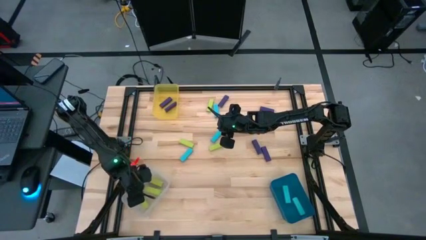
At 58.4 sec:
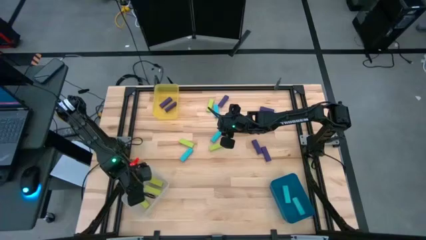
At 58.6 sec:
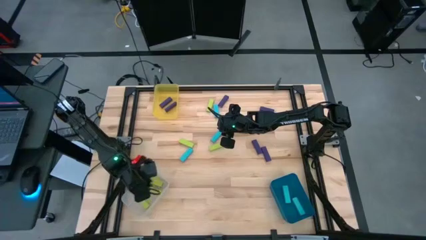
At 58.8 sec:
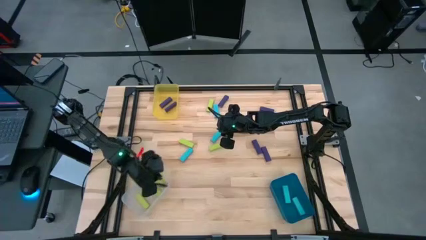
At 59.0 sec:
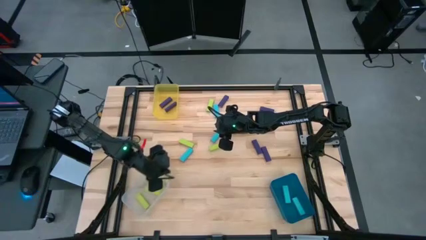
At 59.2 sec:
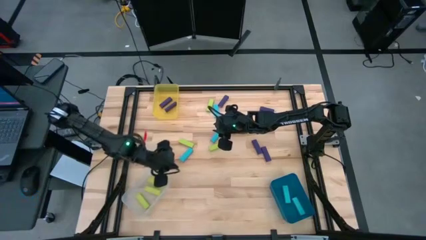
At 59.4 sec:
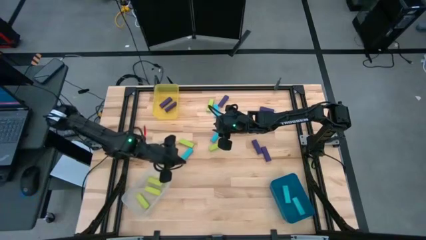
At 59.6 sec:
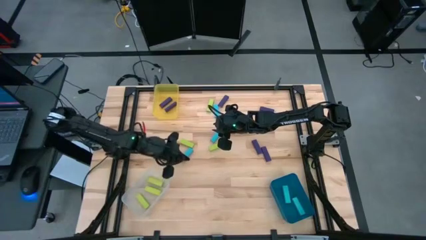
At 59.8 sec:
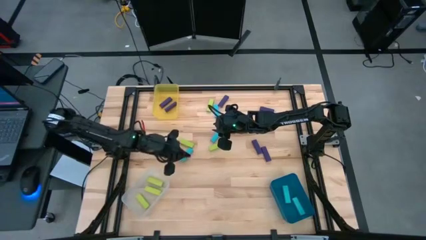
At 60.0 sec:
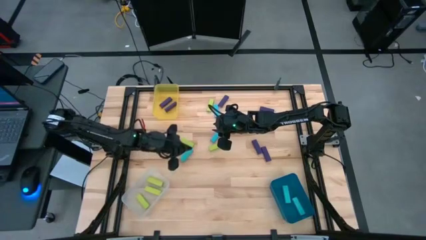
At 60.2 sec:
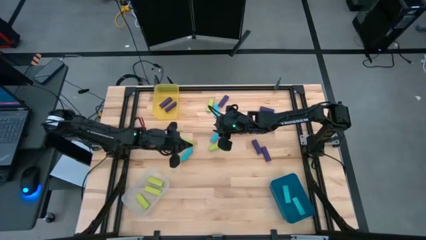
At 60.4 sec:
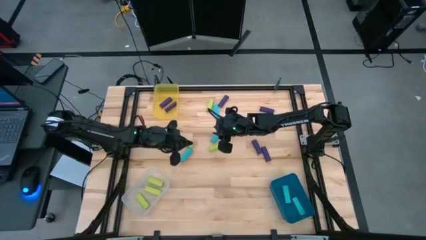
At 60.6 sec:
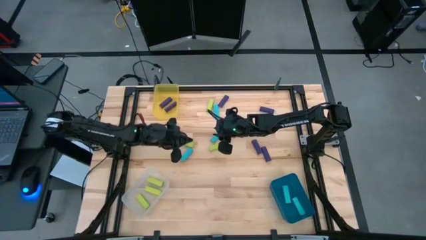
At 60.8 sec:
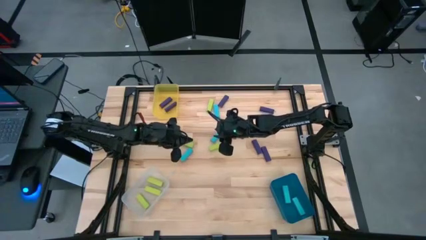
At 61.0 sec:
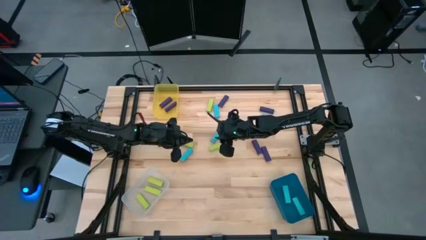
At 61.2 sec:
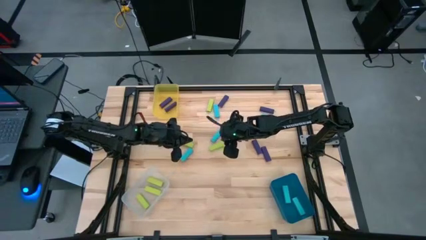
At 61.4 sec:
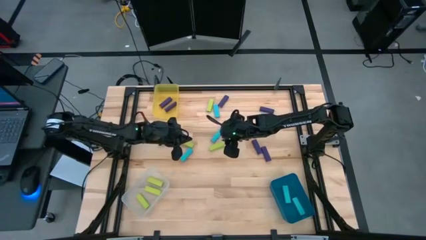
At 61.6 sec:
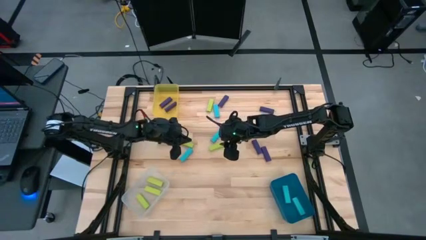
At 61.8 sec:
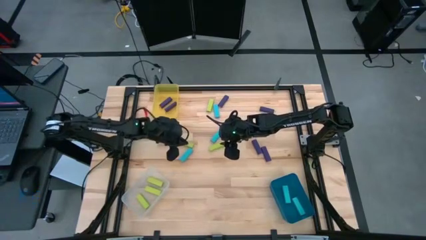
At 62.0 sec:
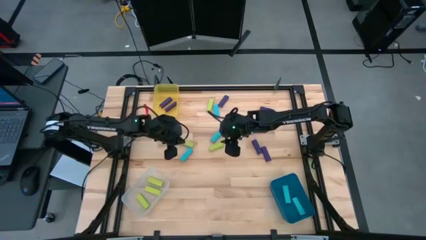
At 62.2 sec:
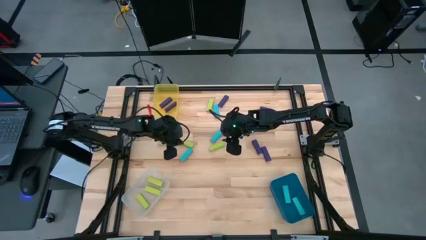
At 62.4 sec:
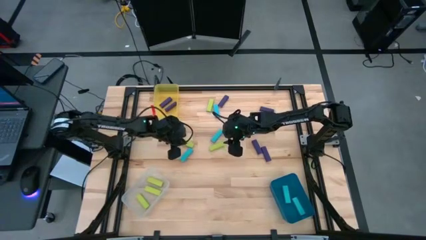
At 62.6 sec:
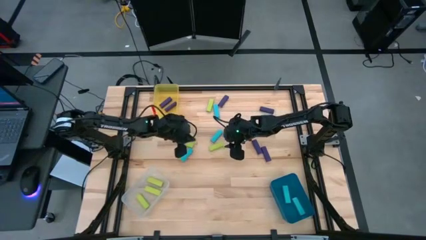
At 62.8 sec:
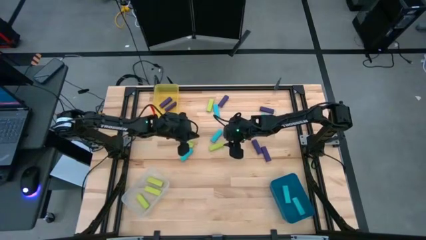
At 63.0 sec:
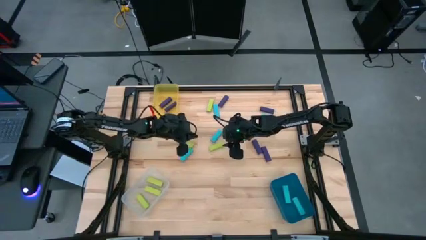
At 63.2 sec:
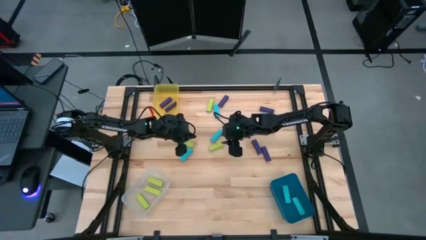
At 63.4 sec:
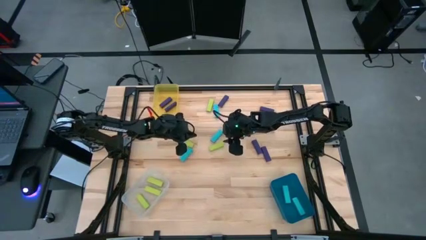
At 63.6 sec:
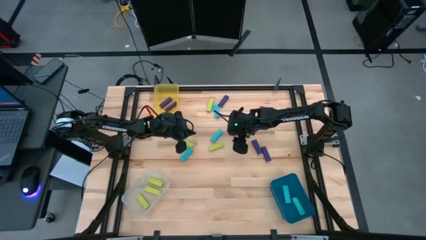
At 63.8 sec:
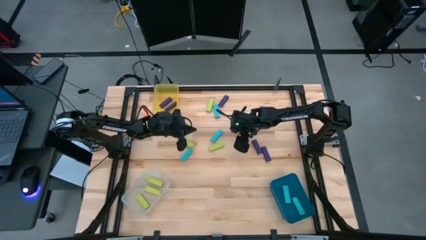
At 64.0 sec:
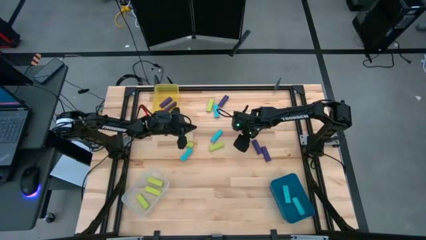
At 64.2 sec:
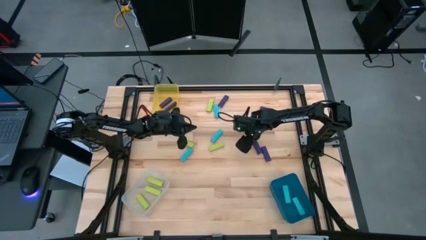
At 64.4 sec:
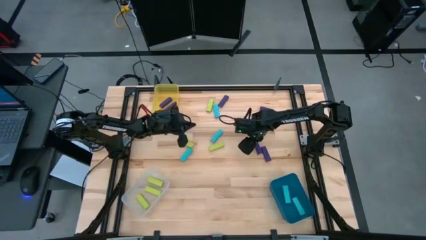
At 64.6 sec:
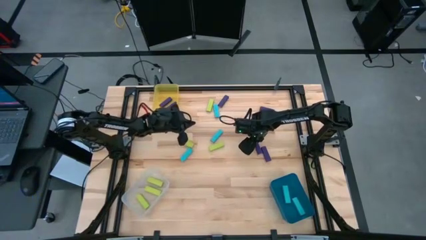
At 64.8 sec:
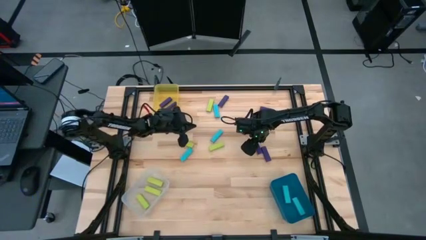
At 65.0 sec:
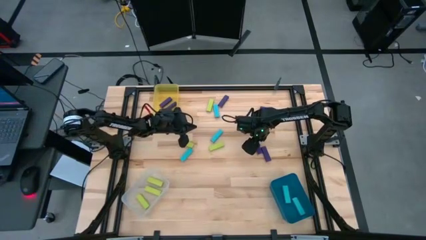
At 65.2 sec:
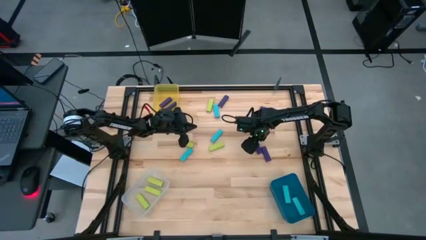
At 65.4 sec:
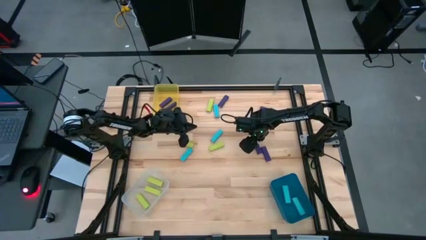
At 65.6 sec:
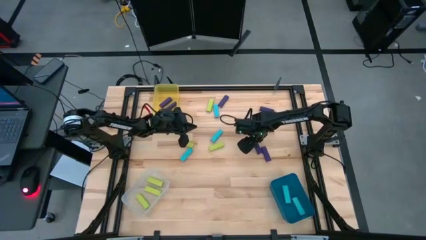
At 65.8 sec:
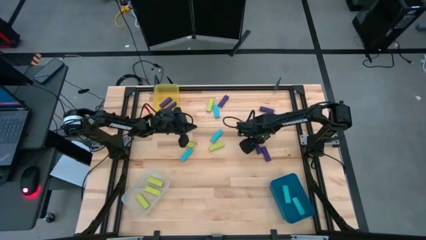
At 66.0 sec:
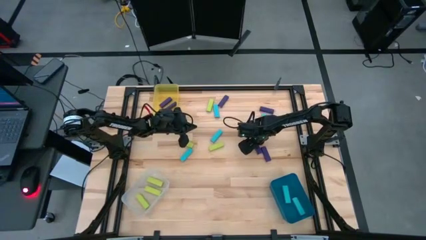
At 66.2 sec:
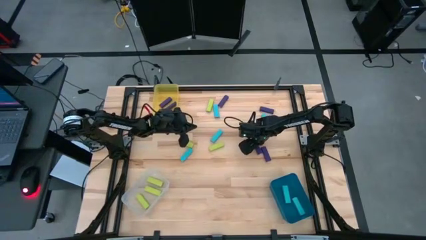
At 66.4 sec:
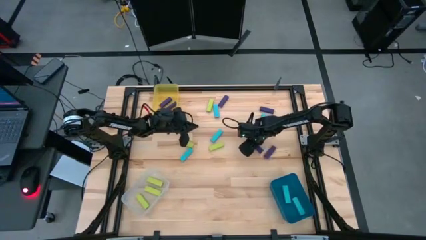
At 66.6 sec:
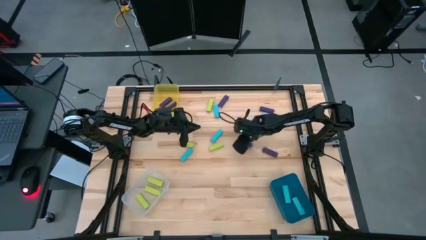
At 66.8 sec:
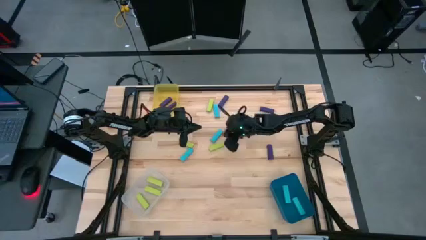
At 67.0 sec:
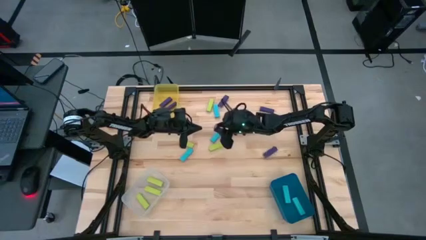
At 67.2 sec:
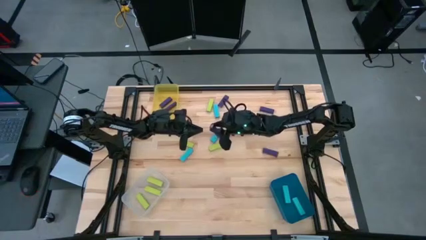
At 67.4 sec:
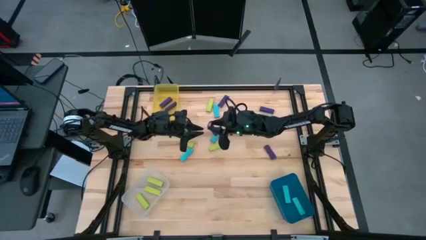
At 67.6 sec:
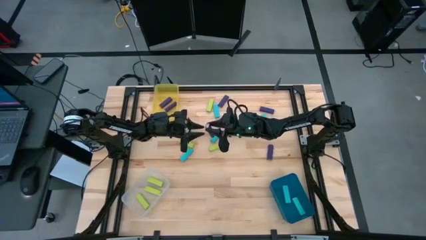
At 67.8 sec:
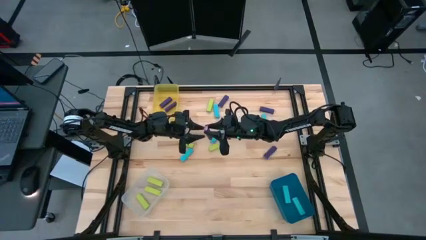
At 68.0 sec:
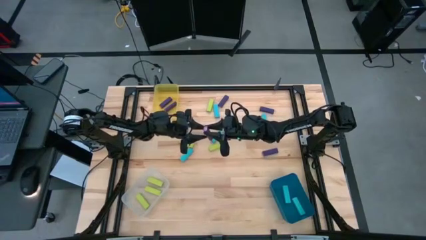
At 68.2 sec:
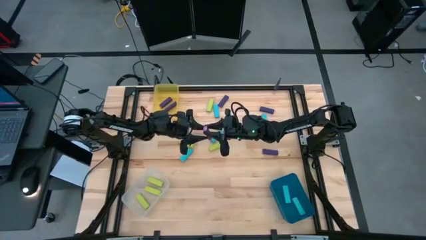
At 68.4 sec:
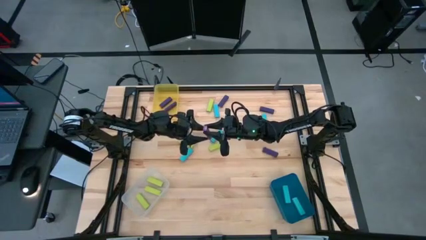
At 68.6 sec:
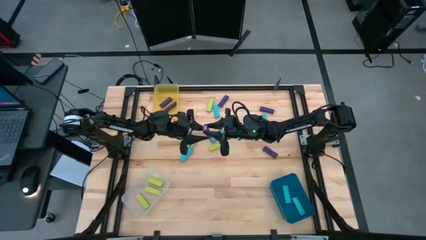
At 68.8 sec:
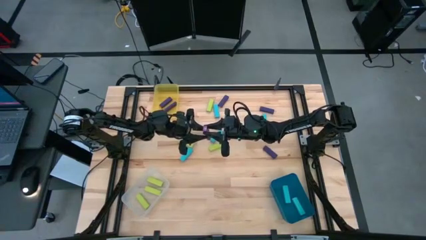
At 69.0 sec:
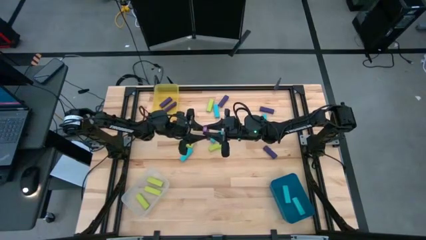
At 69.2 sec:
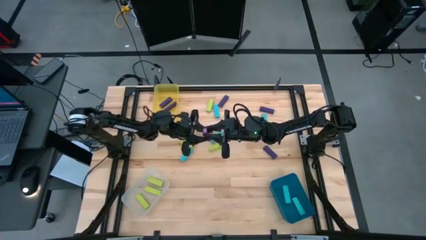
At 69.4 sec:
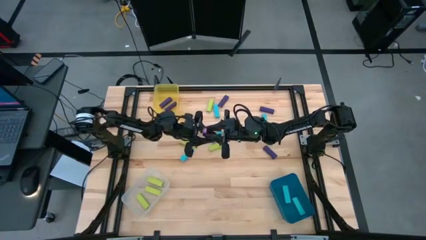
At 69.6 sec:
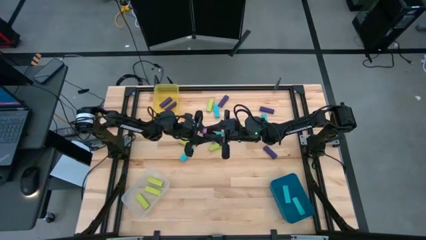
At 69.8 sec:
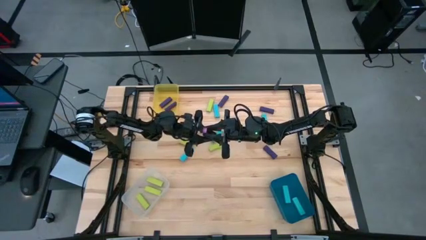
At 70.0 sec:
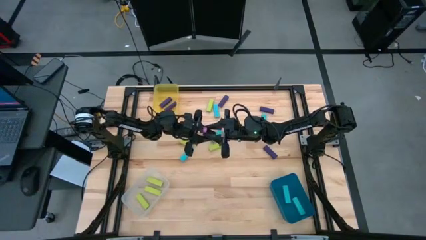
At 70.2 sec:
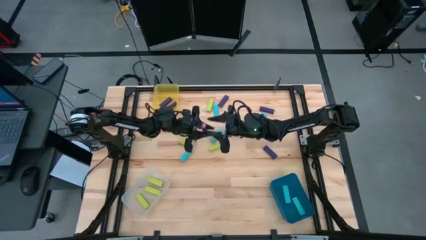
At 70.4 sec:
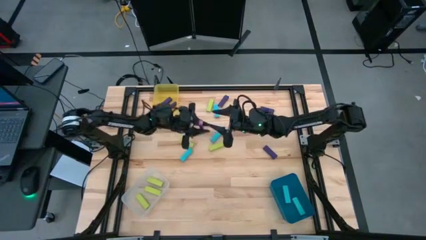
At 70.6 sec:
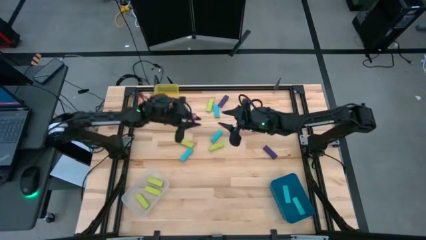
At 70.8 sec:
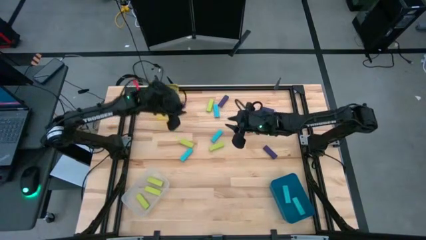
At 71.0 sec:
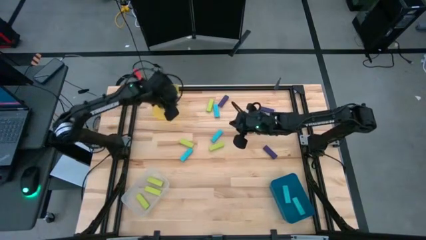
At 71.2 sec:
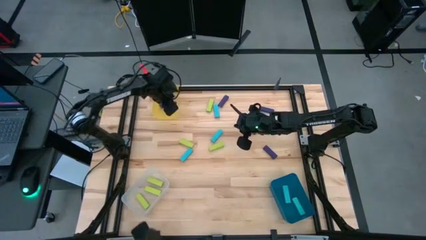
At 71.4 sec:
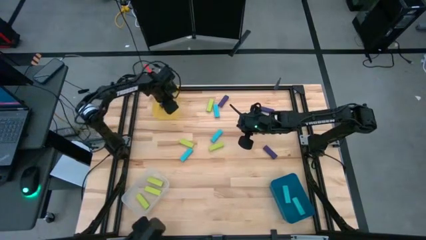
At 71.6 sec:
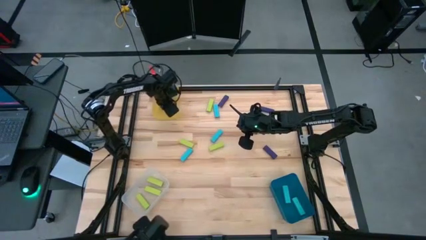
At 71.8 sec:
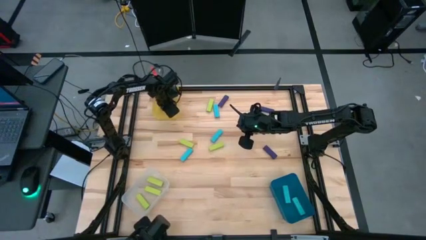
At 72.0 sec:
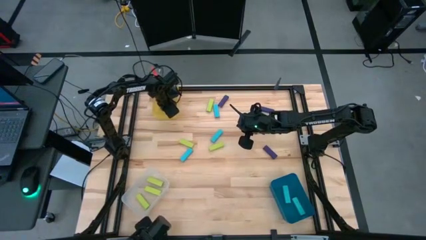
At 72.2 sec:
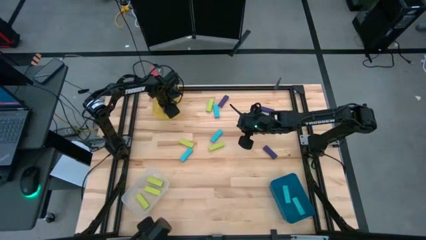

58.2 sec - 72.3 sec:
Task: Sort blocks
Put the violet block into the yellow bin

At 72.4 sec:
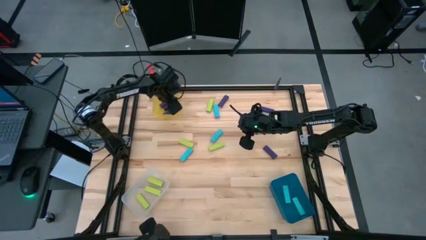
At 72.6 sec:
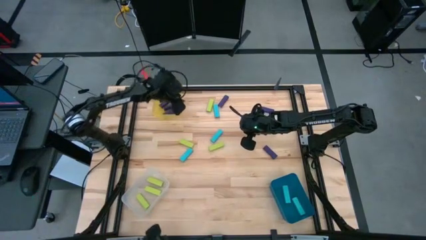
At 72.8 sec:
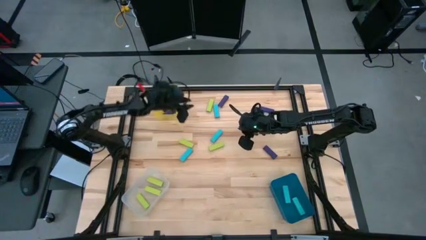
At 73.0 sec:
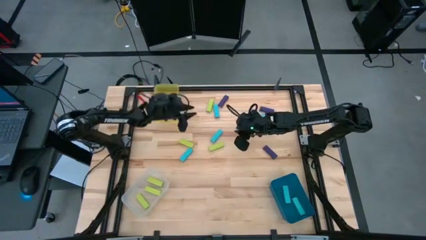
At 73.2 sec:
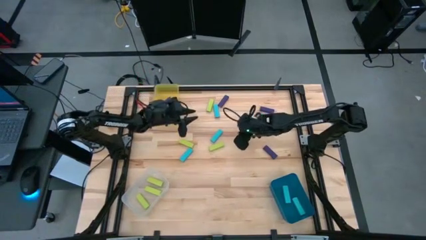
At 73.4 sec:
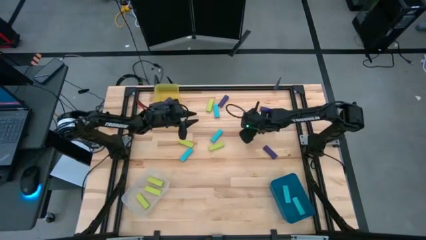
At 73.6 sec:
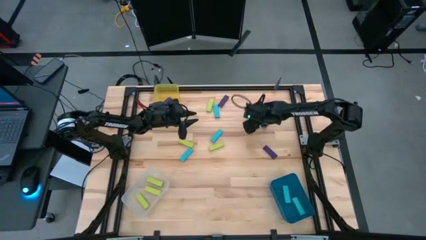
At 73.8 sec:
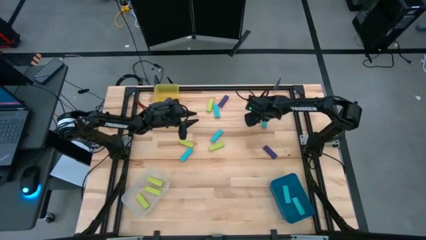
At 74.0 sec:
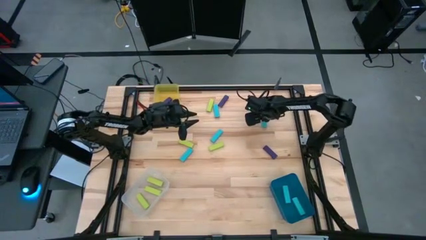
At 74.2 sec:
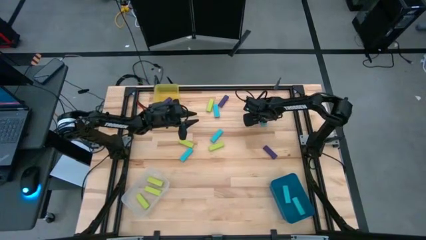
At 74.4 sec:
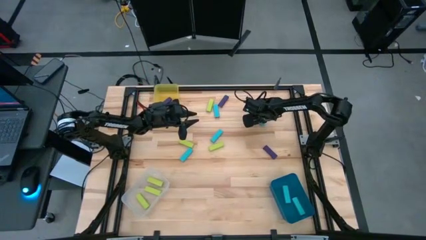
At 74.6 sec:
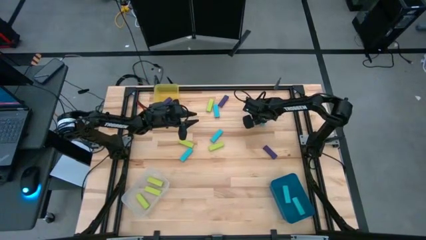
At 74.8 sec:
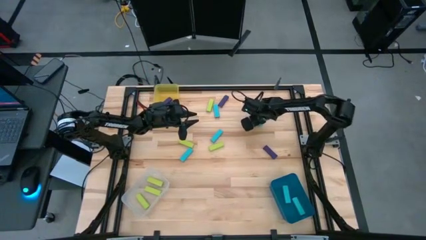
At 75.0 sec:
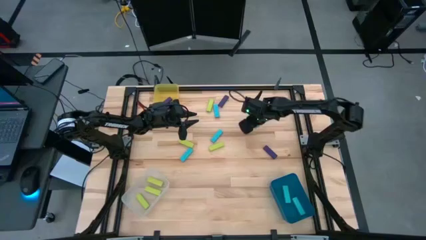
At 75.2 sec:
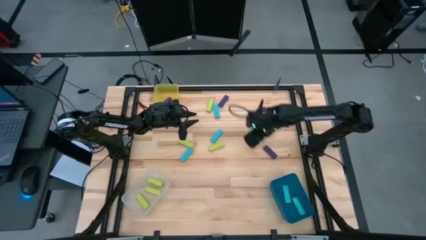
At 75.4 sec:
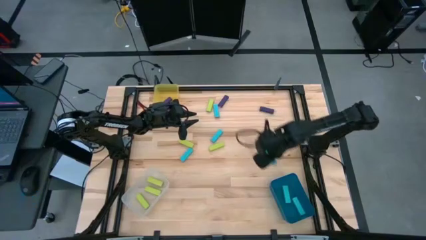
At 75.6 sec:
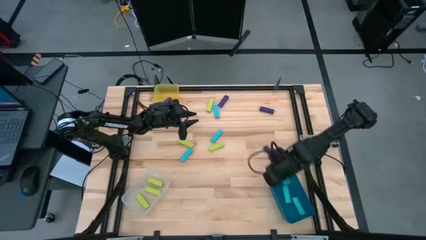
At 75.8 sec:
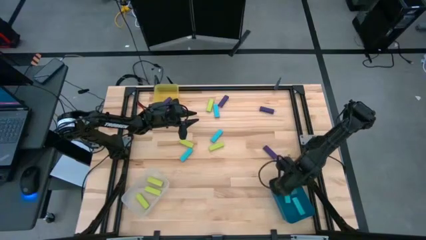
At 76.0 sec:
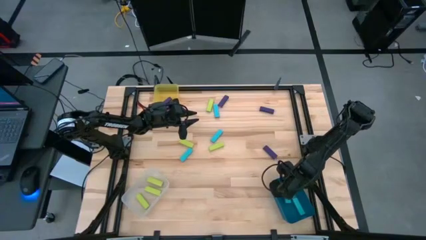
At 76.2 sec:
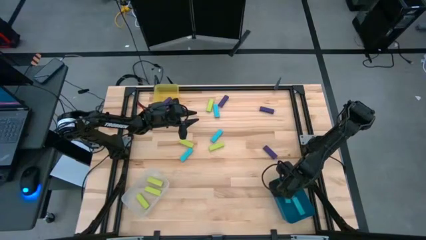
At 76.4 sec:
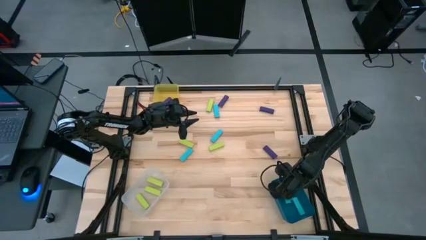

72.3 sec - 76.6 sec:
Put the blue block into the blue bin
